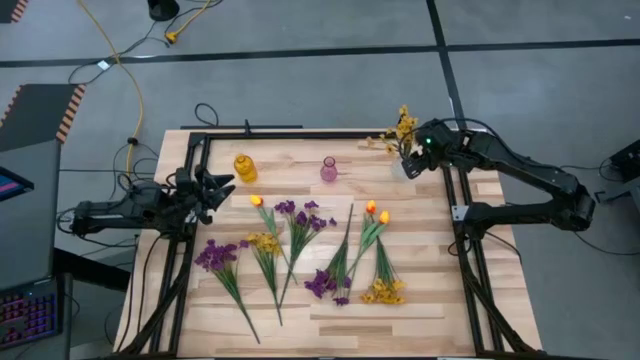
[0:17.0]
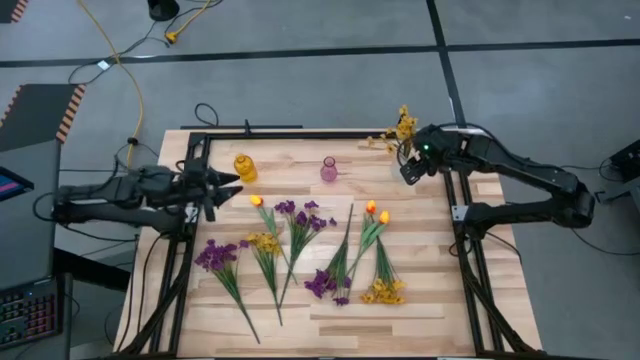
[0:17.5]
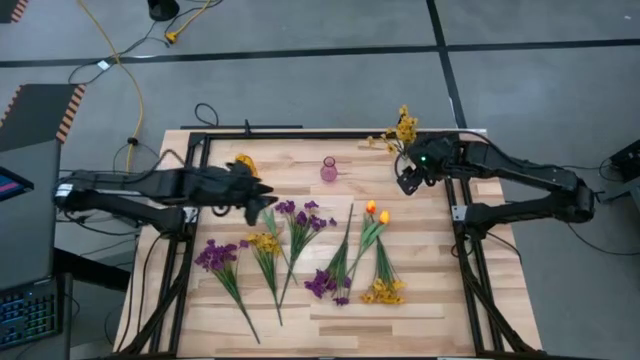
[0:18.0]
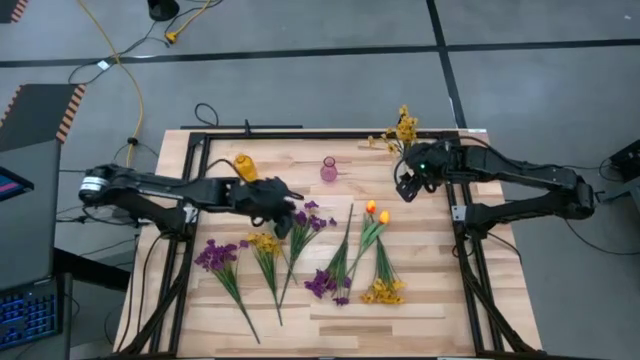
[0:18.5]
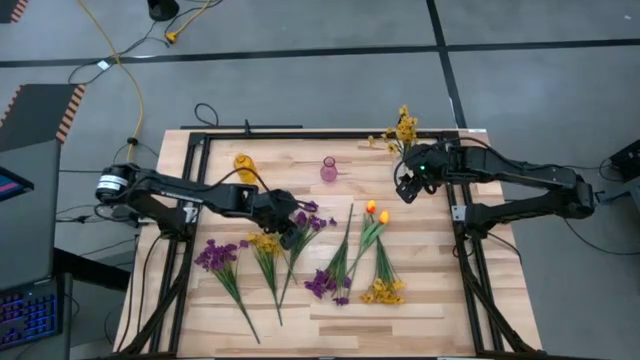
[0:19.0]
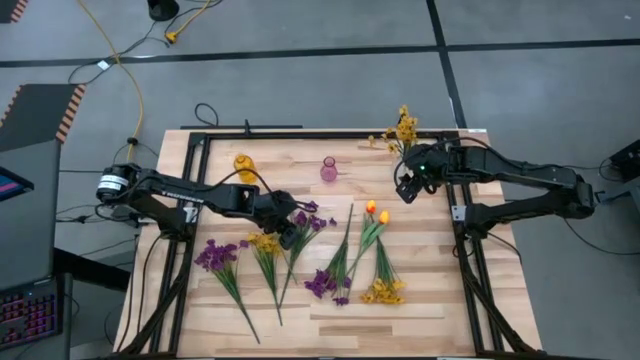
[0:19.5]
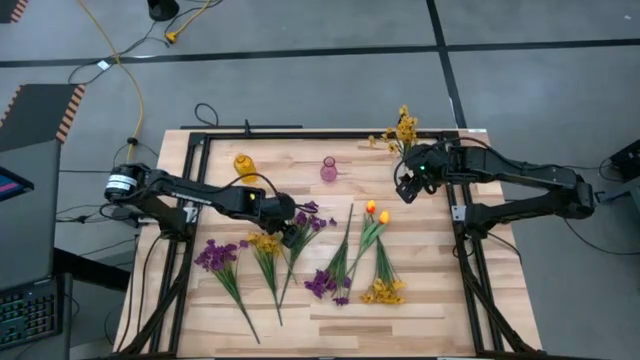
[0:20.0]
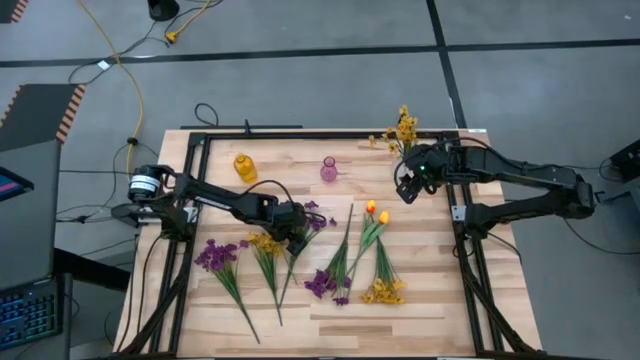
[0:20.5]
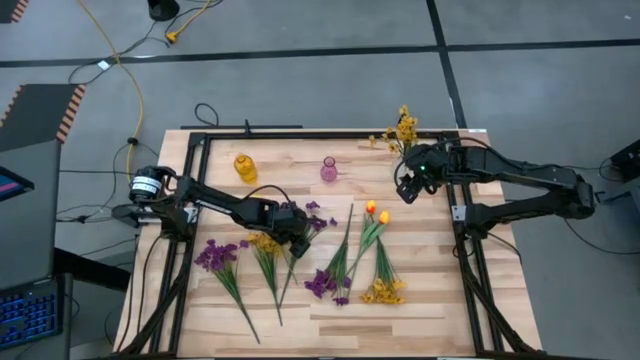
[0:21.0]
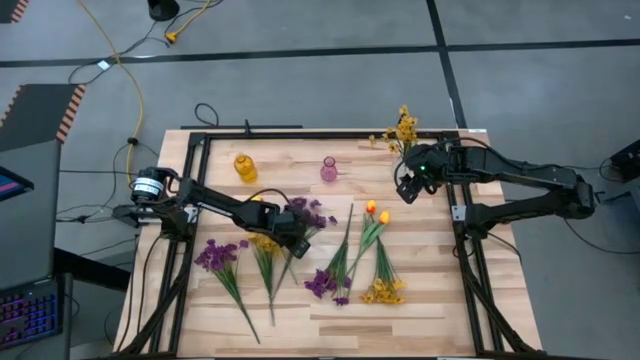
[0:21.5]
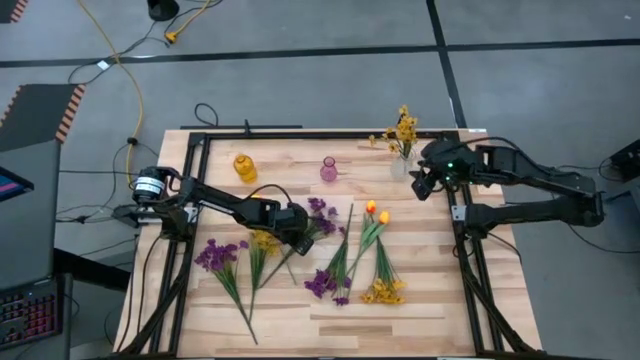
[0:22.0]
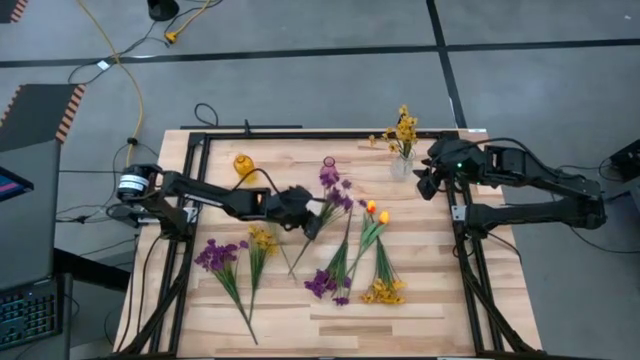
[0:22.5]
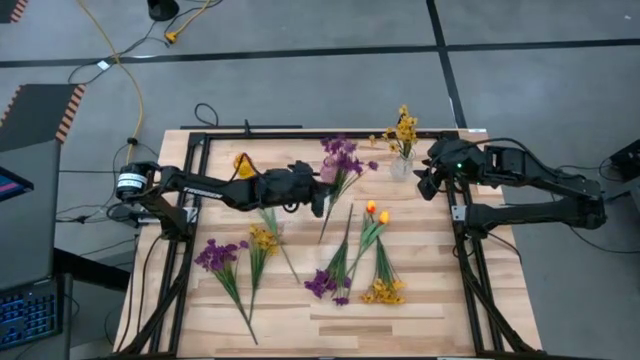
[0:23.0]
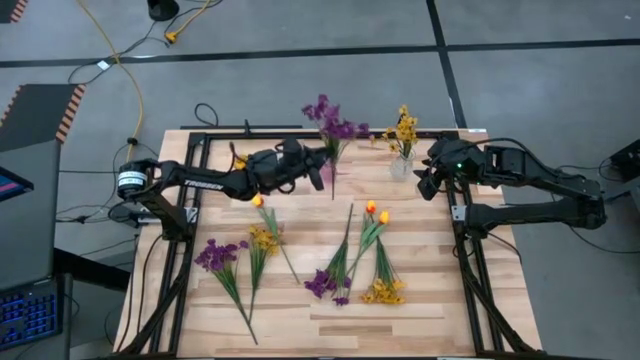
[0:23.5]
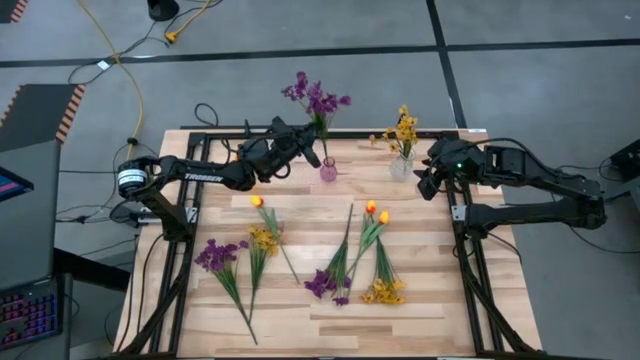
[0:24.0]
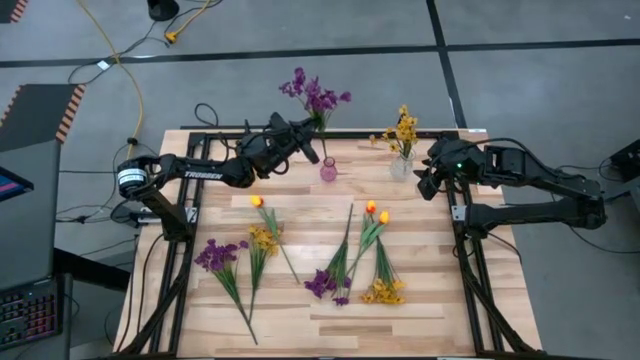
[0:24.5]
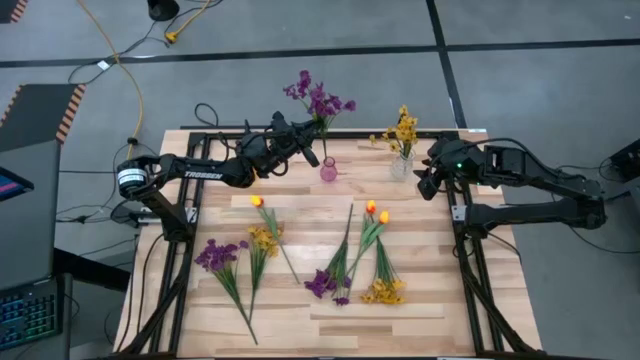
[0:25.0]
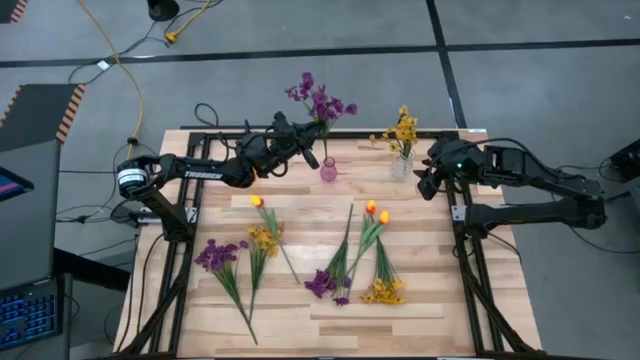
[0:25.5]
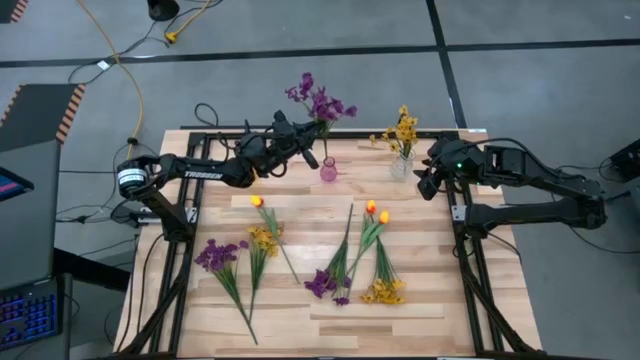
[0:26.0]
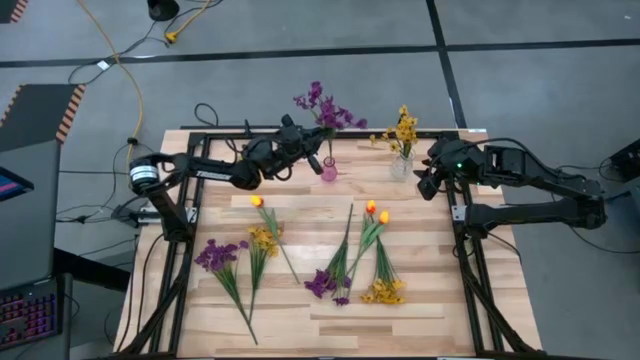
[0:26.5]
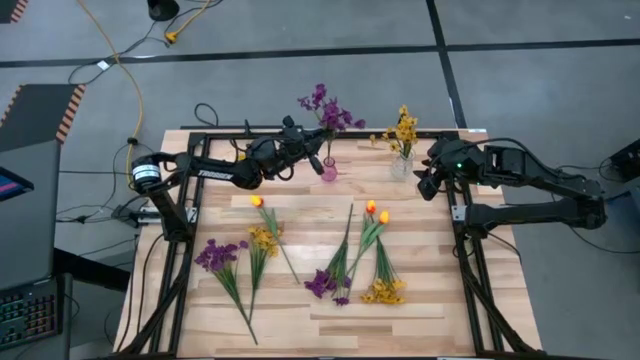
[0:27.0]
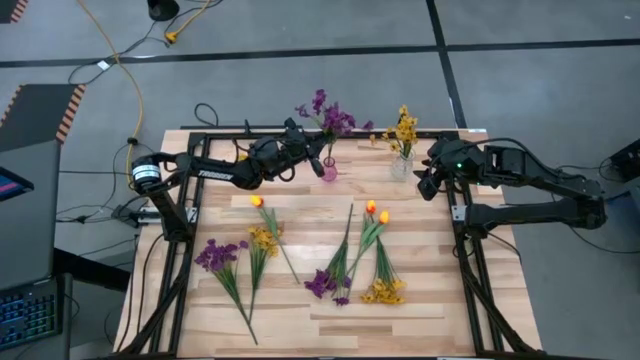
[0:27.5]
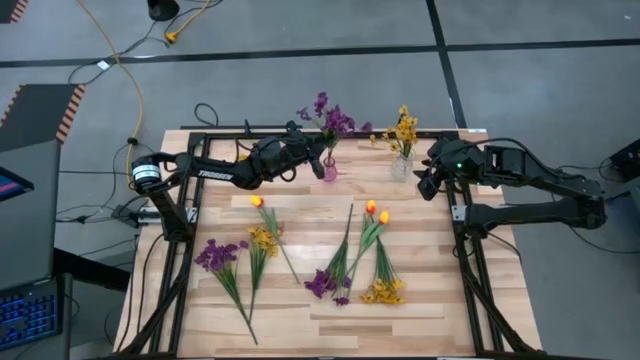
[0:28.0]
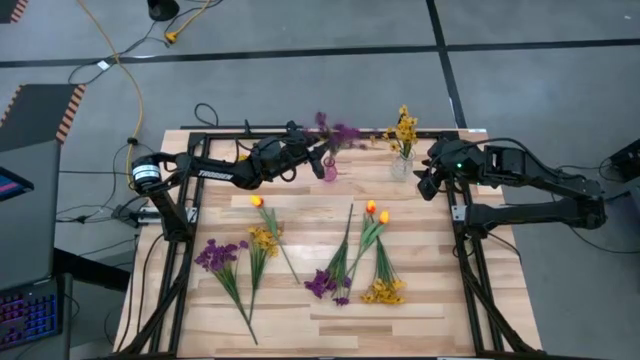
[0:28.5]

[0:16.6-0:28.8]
Task: Sort flowers into vase by color
Put the top violet flowers into the violet vase

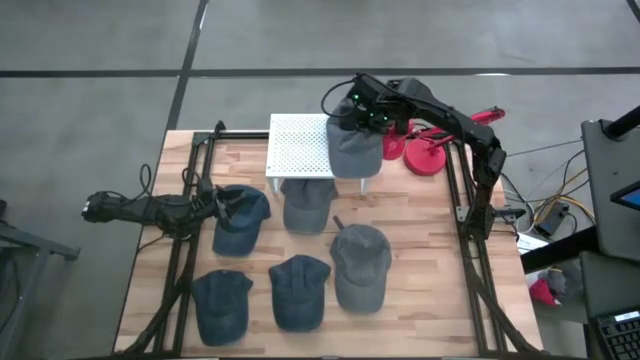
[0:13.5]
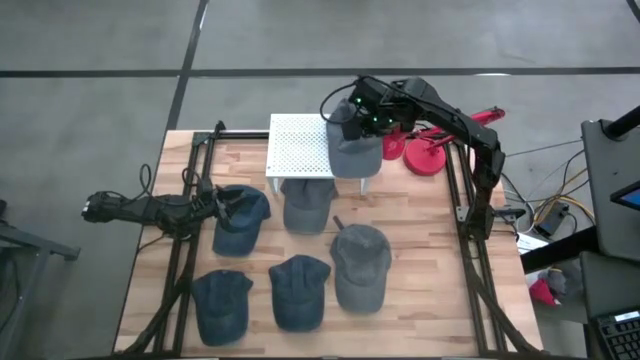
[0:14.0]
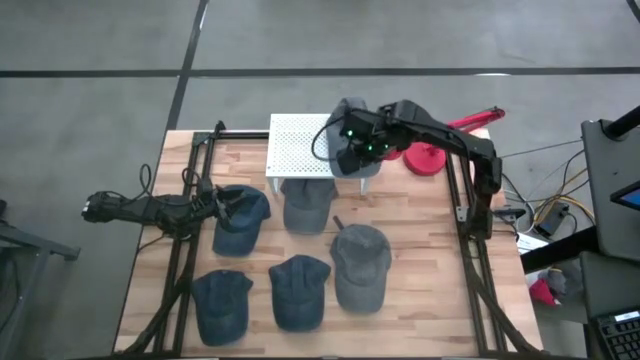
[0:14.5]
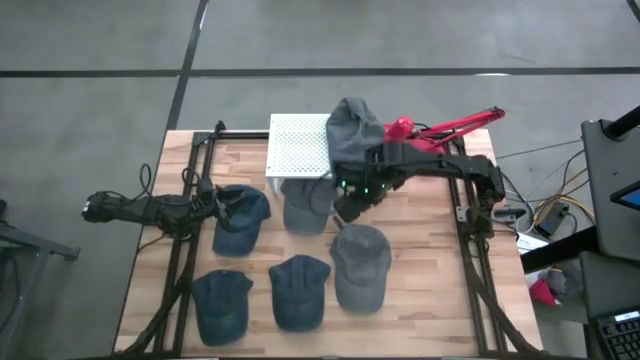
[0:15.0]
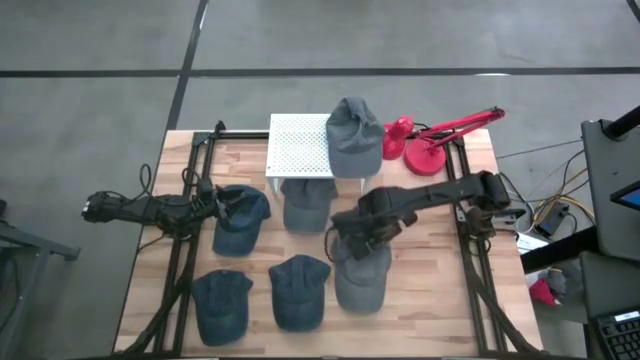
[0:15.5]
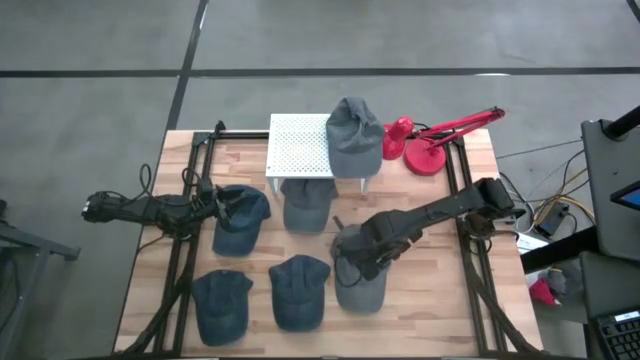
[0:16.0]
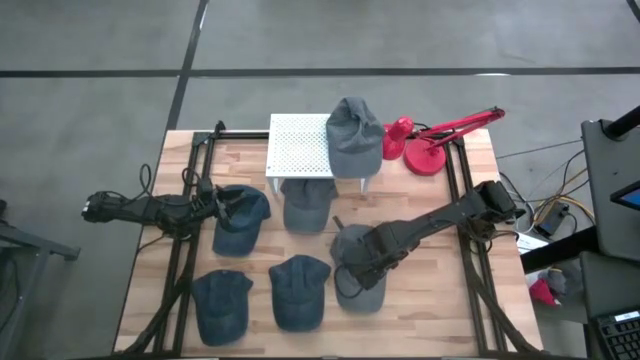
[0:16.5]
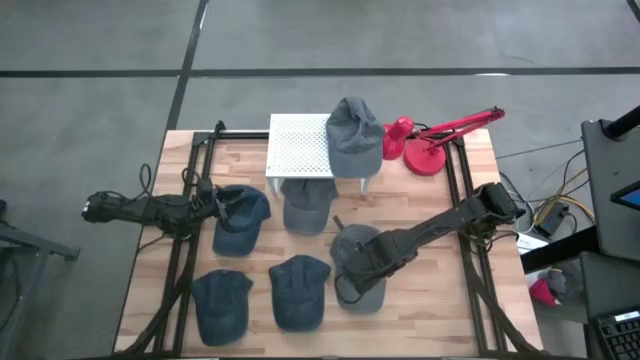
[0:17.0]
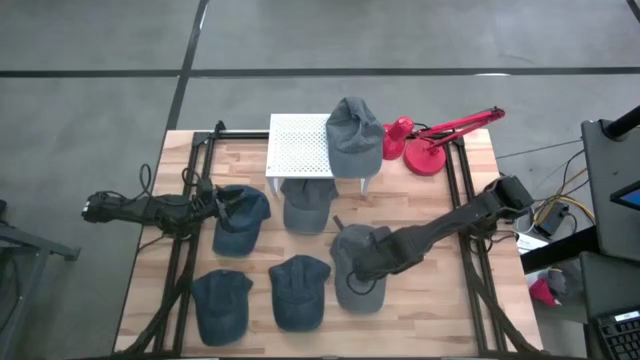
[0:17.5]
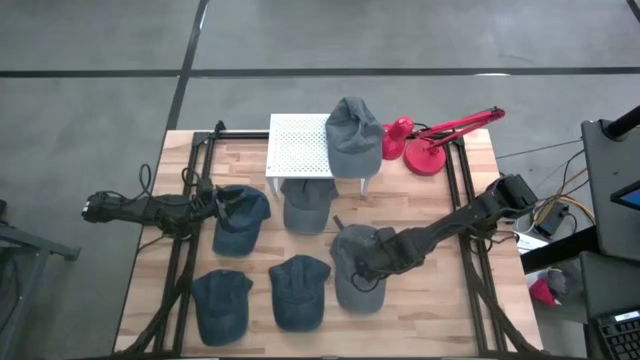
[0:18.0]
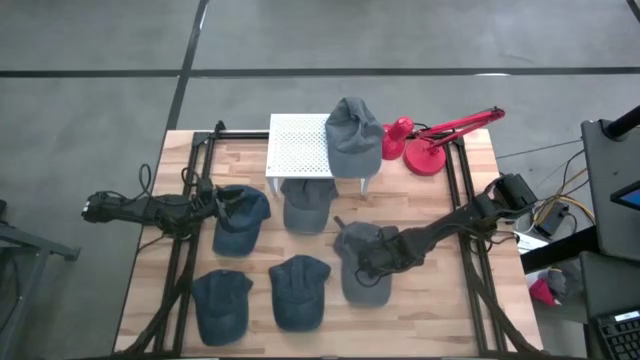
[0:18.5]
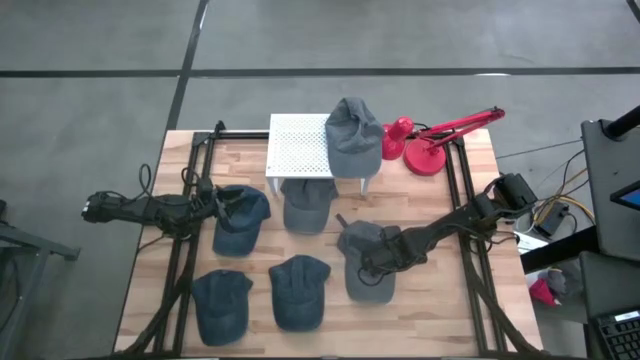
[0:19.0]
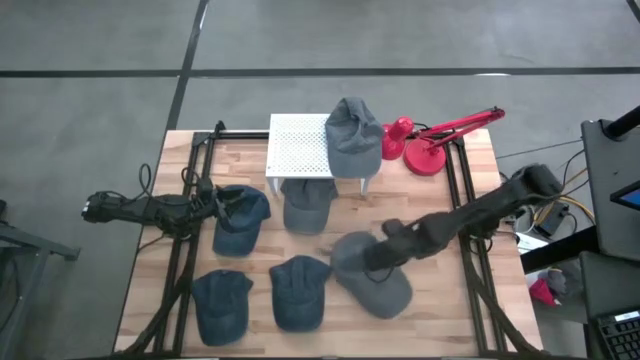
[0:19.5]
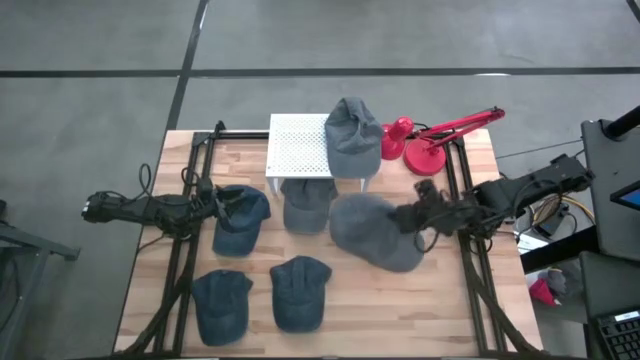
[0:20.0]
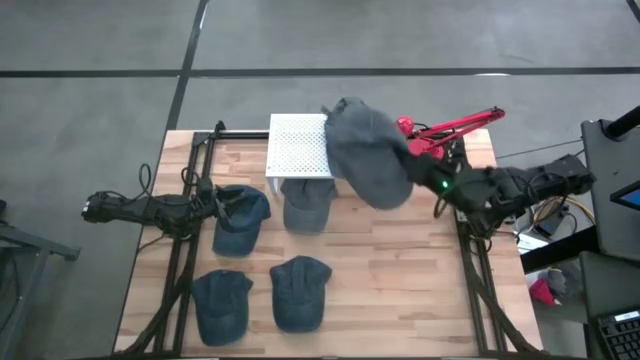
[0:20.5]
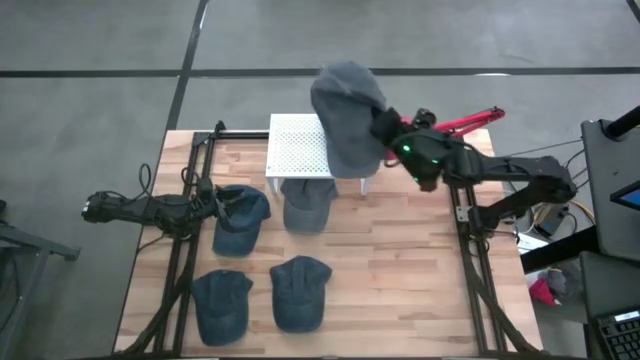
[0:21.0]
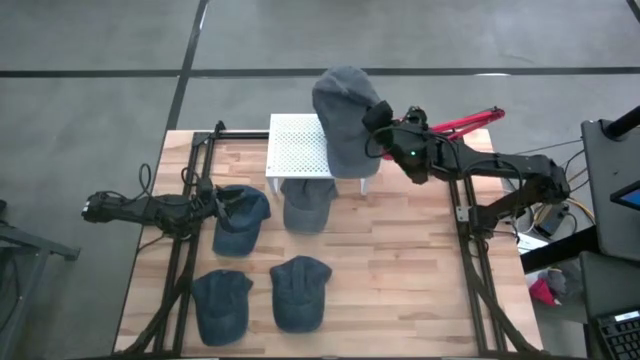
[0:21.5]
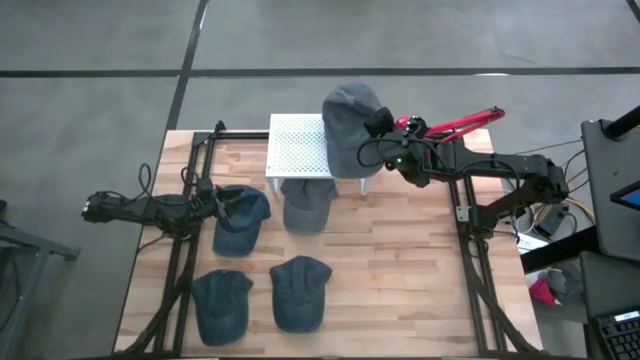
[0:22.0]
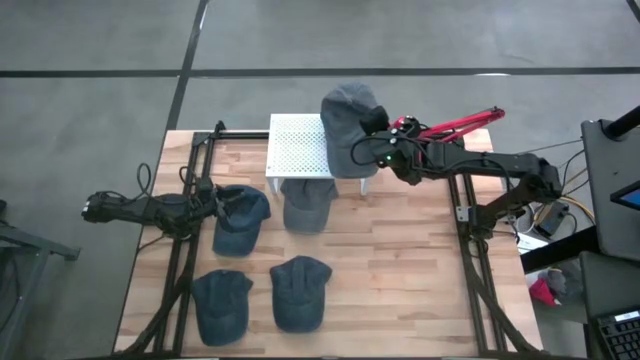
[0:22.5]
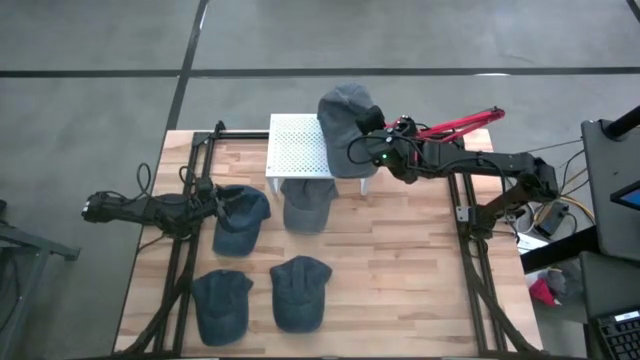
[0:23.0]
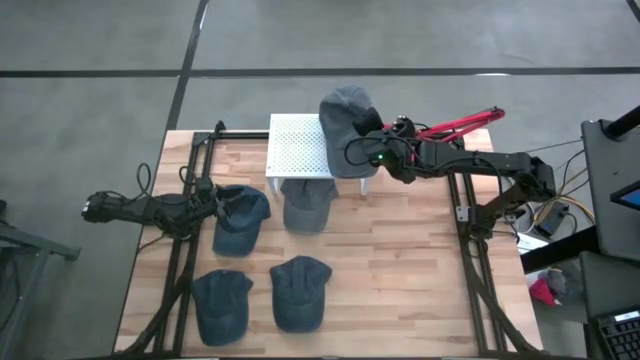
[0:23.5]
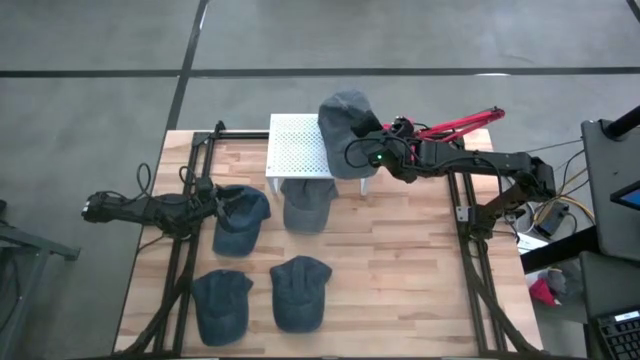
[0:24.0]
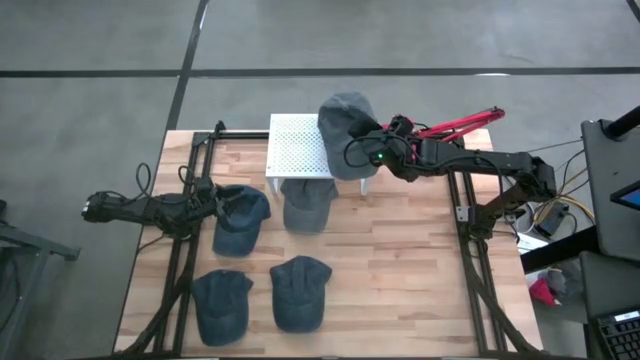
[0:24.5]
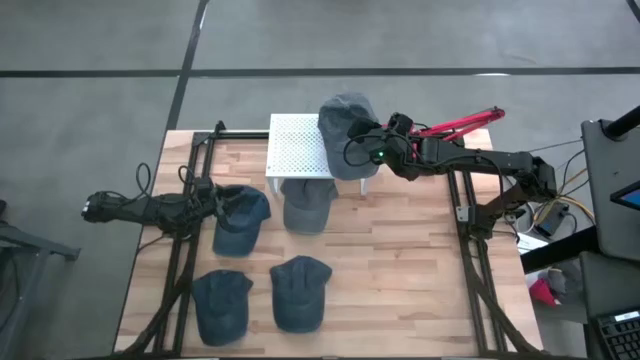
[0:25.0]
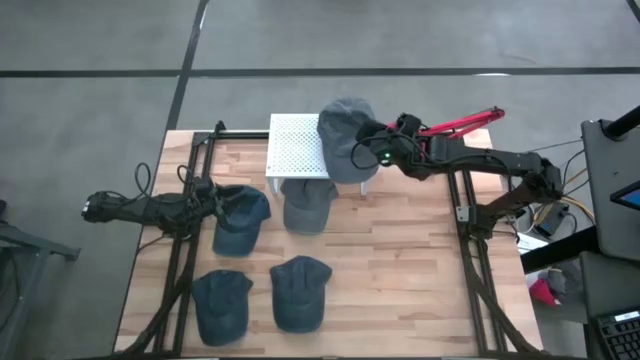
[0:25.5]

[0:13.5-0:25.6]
Task: Stack small to large cups/mugs on shelf
Stack the left gray cup on the other gray cup on the shelf
